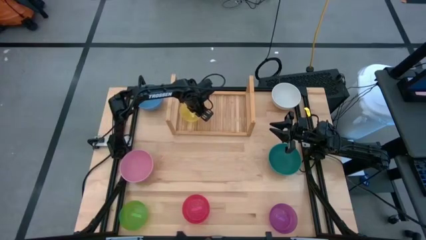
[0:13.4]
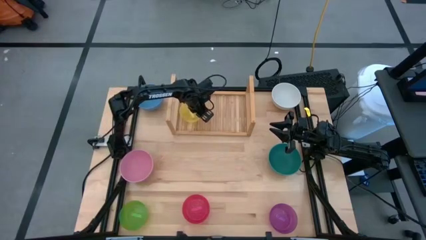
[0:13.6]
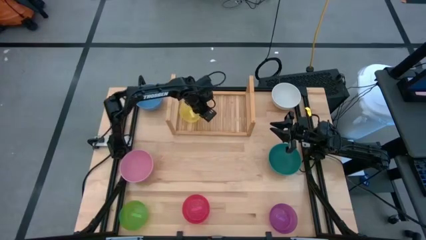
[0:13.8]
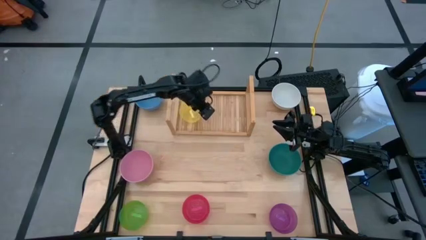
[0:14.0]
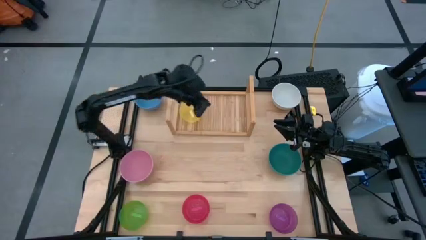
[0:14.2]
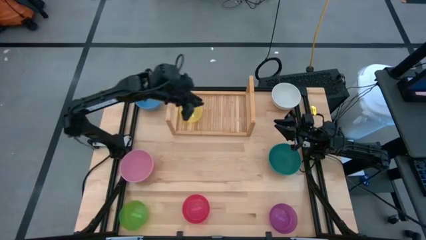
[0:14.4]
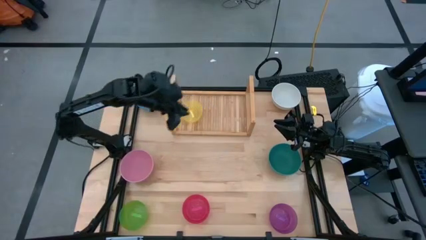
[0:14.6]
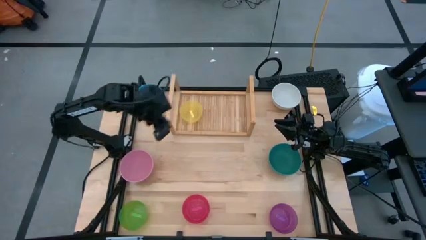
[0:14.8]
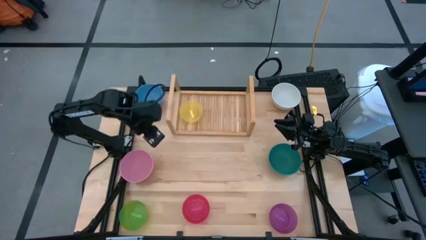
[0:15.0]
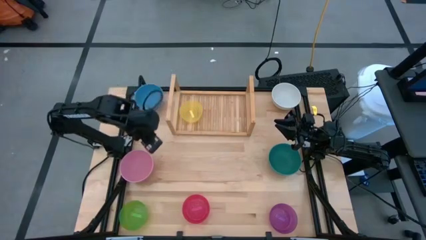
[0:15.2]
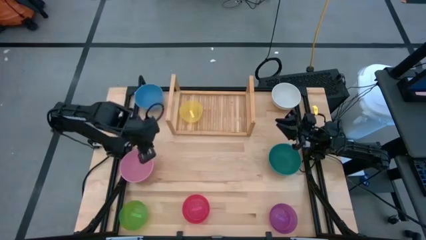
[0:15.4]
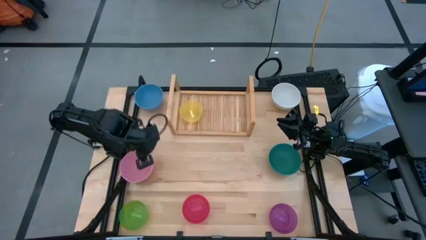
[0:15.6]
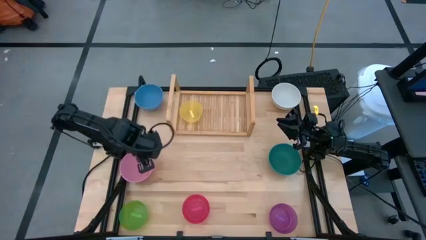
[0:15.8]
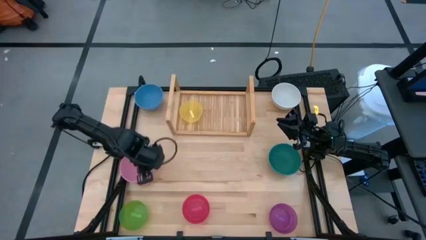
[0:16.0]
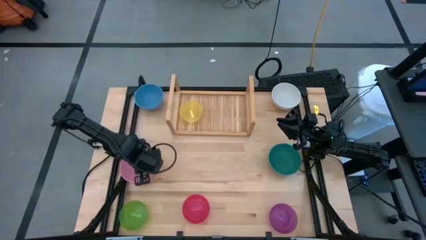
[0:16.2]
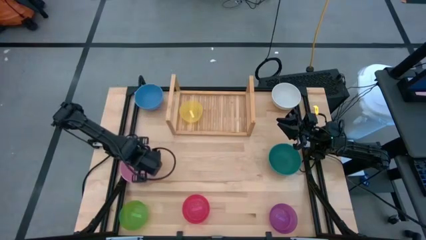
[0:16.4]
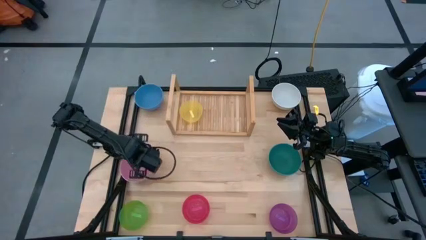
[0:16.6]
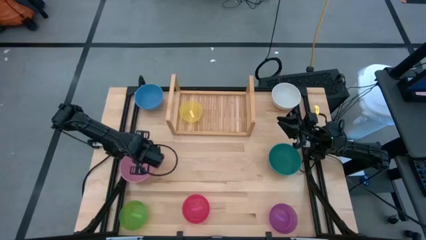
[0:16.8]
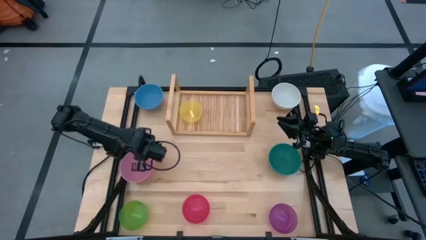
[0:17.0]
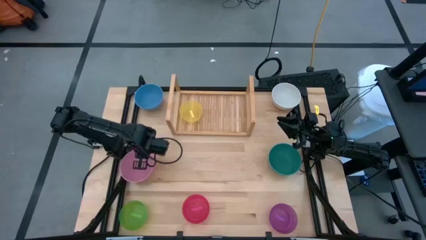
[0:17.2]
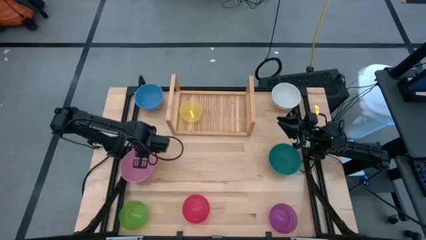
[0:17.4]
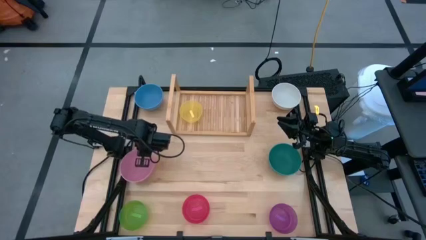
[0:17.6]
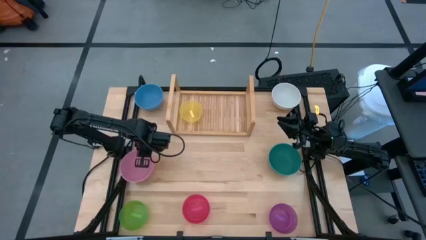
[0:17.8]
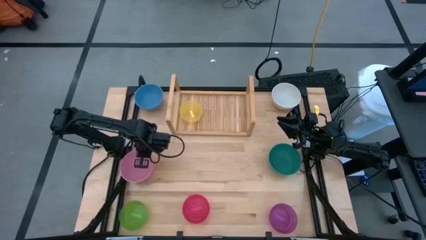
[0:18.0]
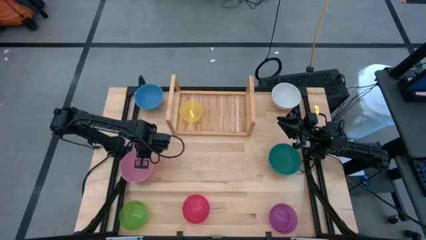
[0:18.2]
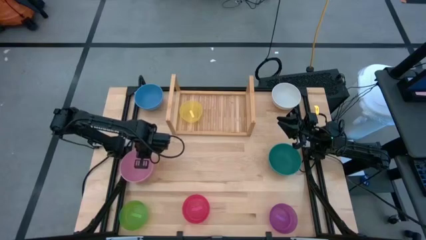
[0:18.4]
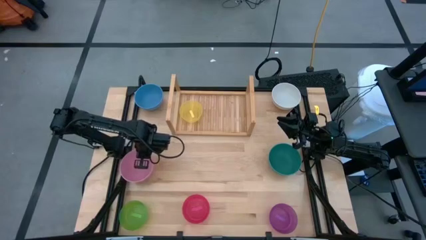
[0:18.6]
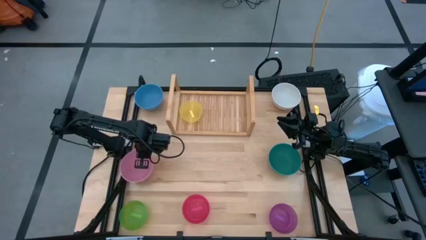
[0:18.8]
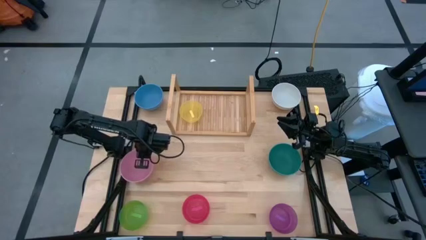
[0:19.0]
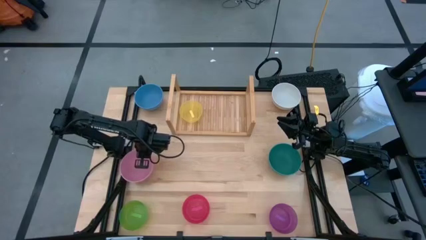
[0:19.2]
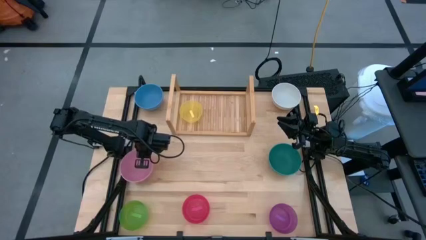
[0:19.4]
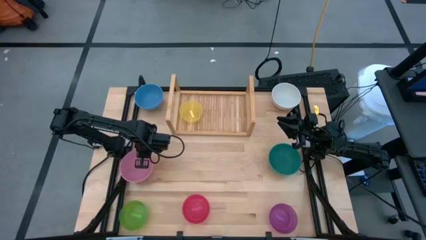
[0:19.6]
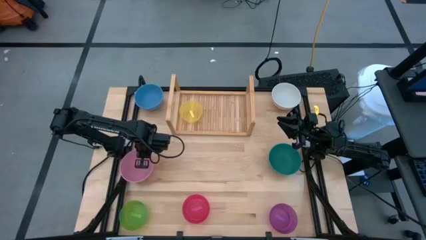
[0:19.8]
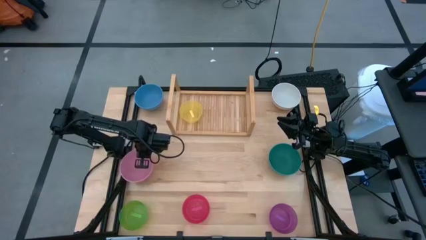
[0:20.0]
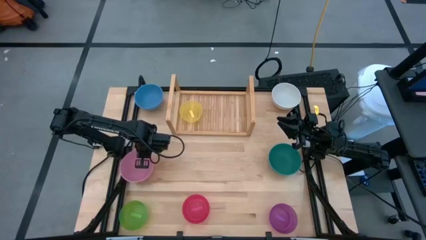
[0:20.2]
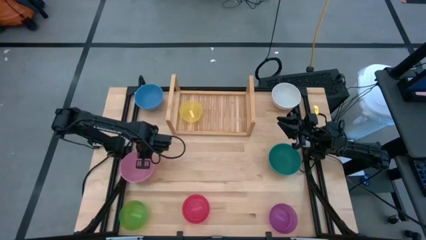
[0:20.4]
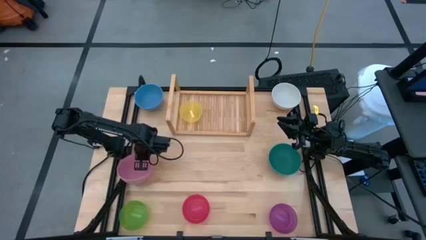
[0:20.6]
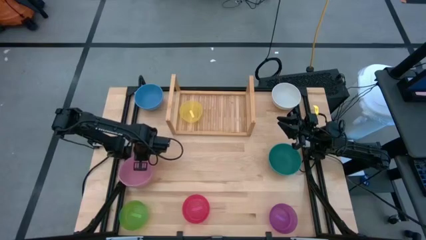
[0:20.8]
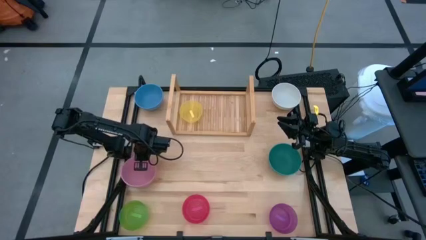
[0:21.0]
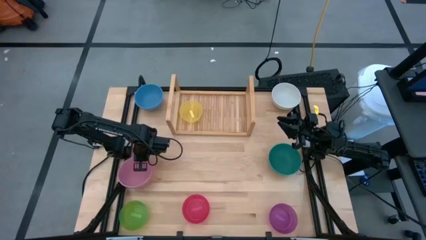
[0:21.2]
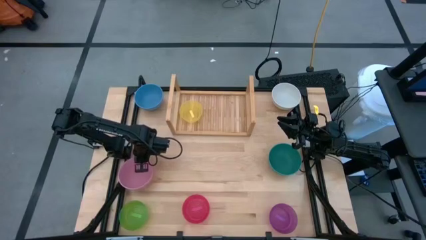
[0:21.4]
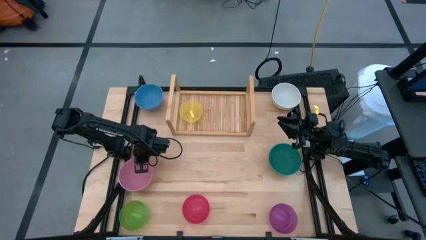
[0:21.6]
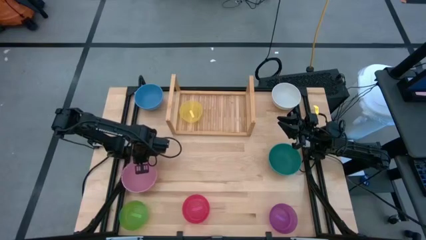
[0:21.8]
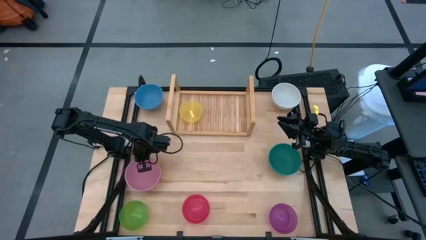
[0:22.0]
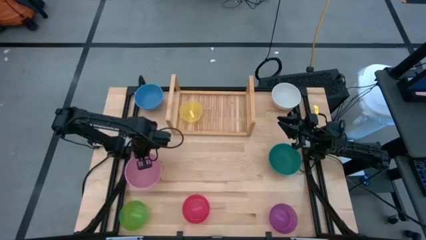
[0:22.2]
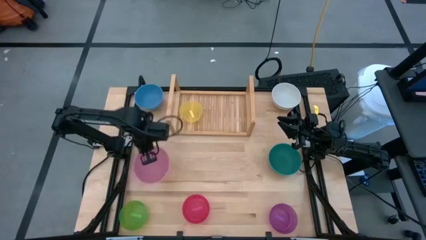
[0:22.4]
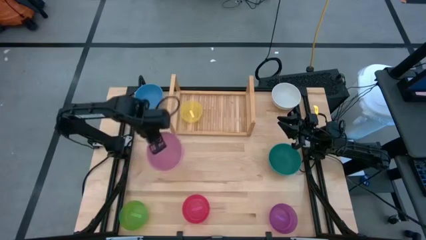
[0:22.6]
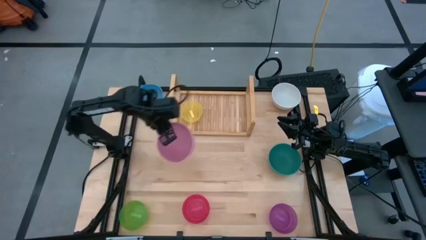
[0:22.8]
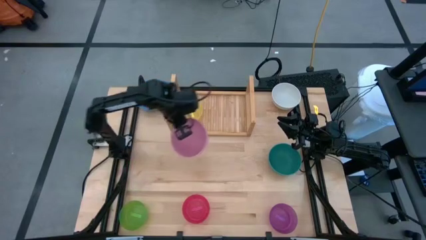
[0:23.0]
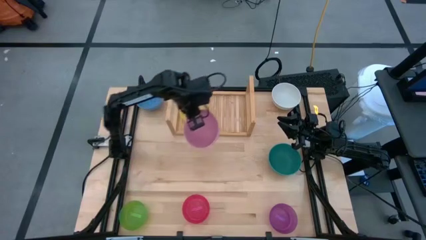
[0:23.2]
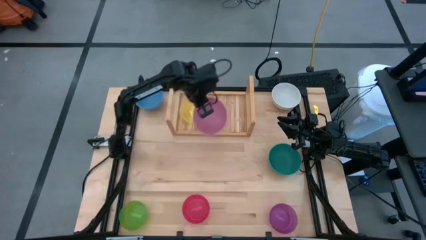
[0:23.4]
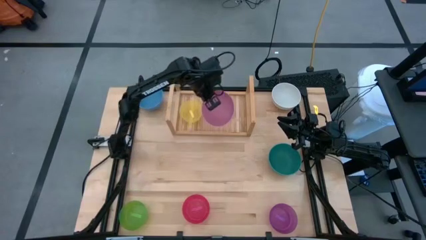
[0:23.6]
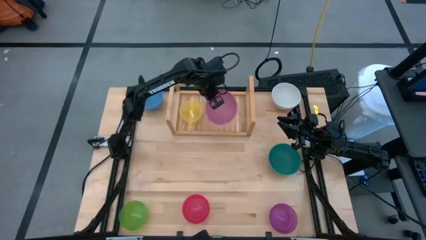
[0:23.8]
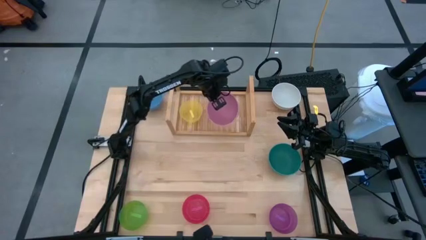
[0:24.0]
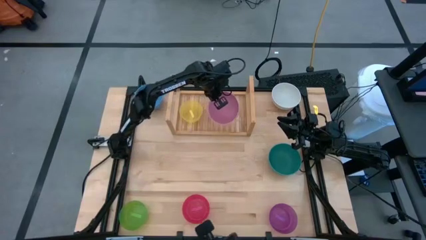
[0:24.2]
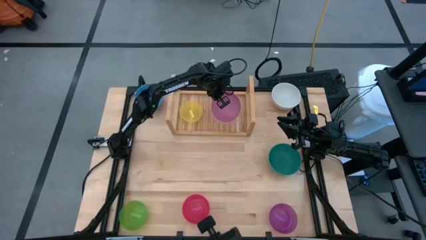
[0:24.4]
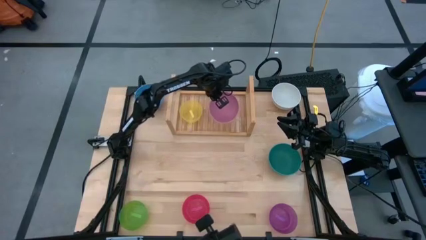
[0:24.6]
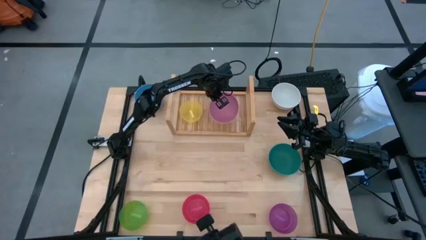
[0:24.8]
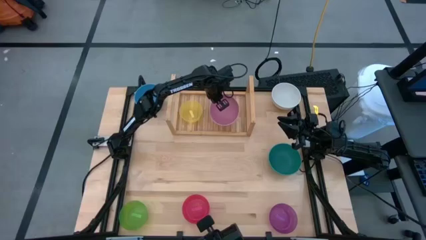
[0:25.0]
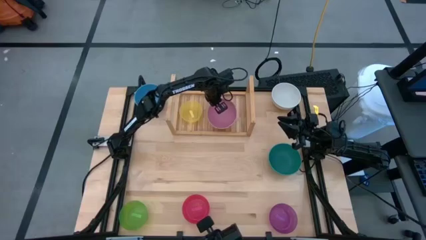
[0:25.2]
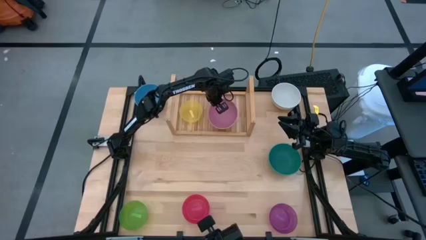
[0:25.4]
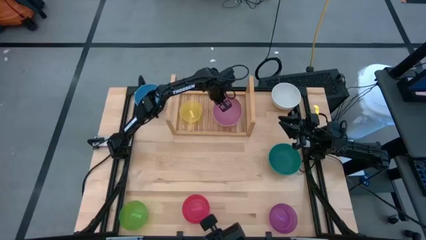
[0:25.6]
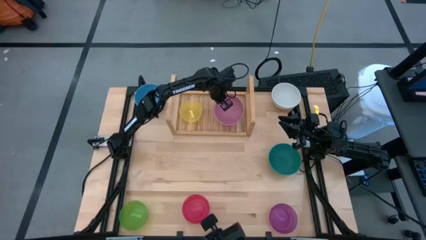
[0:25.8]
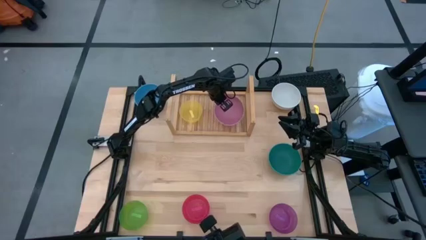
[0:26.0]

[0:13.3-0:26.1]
Task: Place and stack bowls onto a shelf
Put the pink bowl on the shelf
